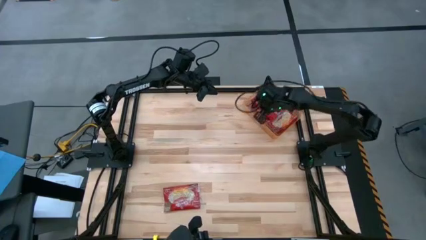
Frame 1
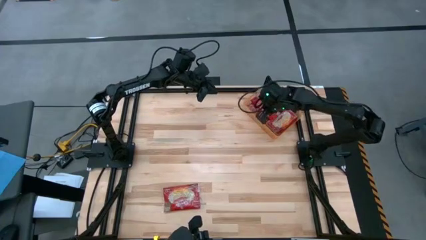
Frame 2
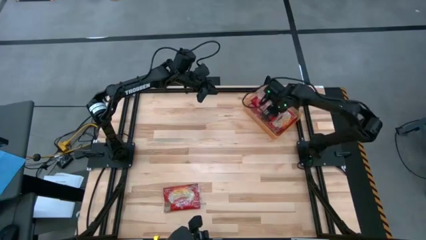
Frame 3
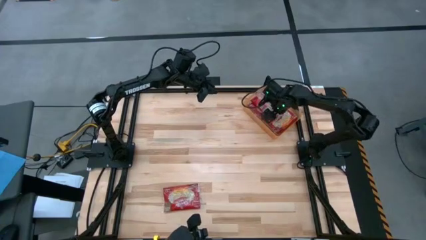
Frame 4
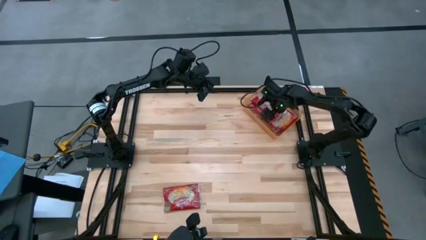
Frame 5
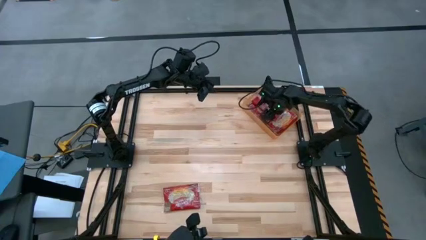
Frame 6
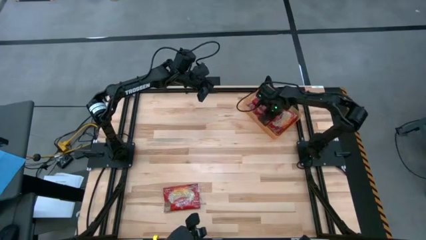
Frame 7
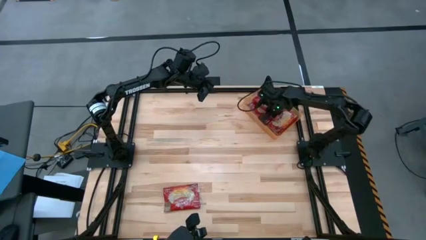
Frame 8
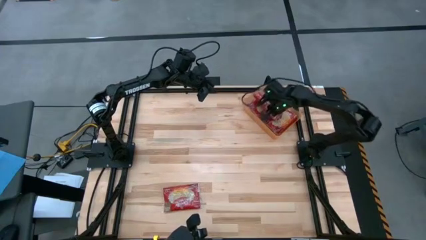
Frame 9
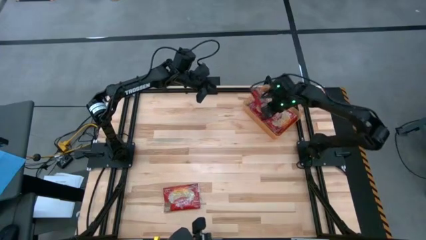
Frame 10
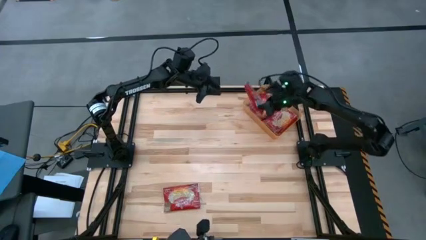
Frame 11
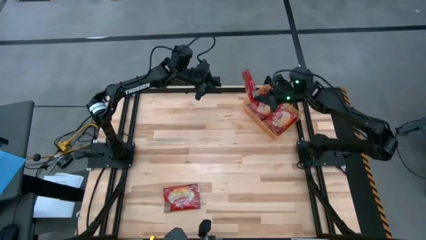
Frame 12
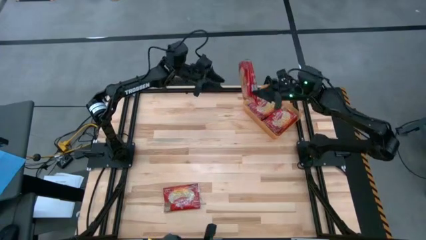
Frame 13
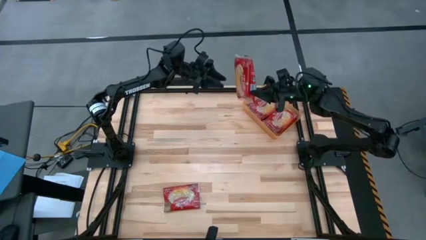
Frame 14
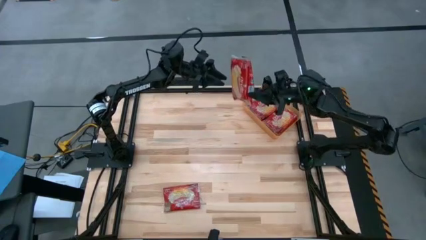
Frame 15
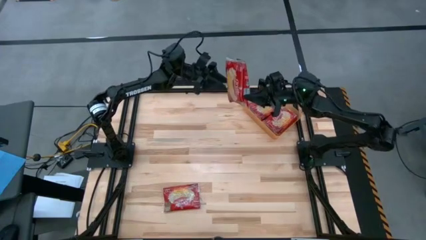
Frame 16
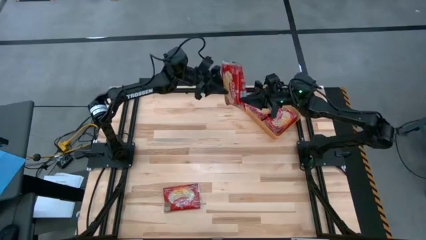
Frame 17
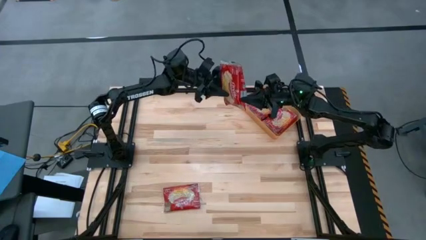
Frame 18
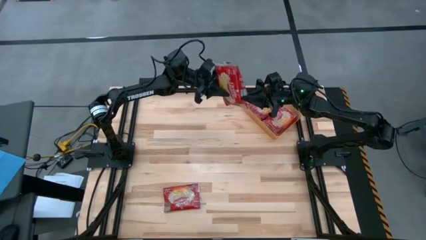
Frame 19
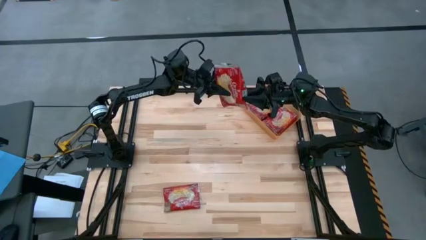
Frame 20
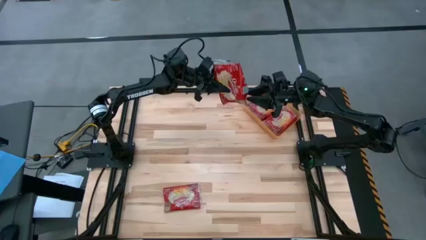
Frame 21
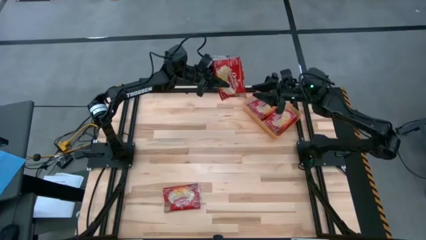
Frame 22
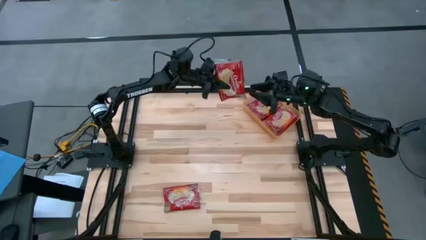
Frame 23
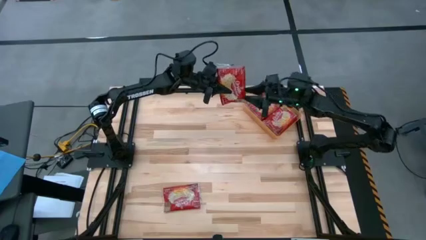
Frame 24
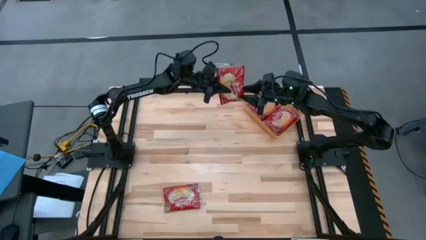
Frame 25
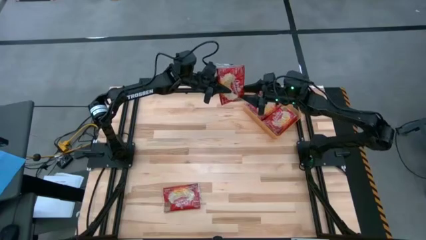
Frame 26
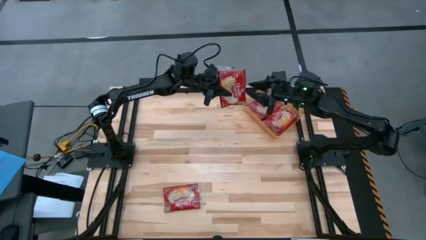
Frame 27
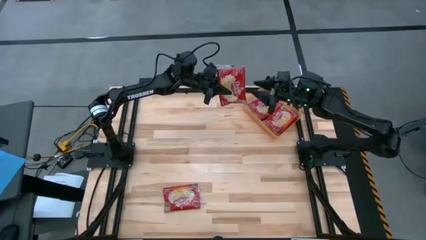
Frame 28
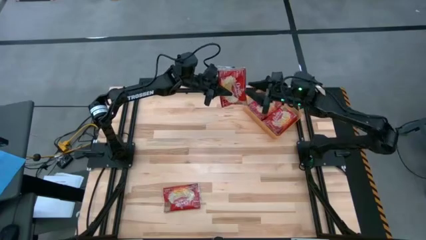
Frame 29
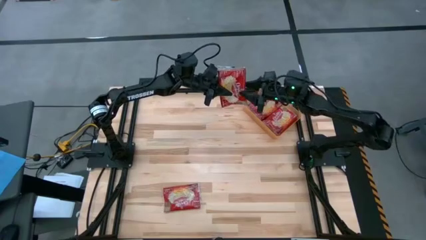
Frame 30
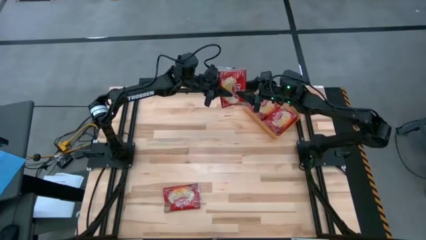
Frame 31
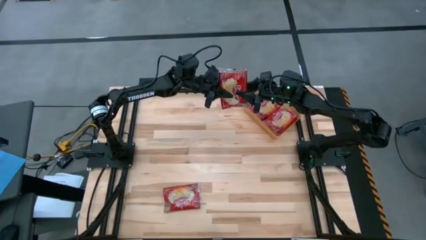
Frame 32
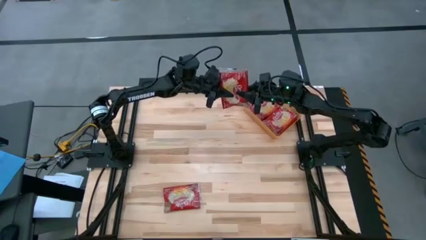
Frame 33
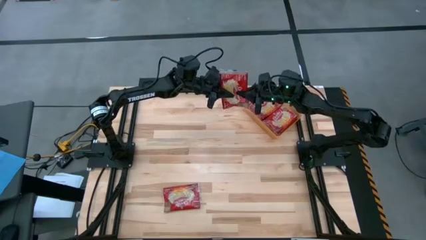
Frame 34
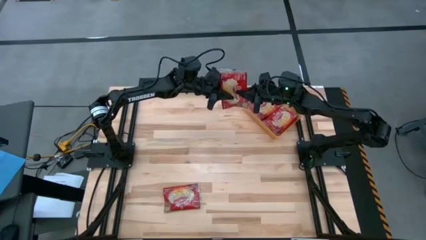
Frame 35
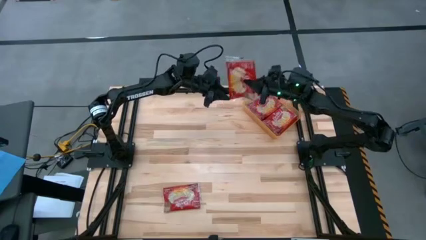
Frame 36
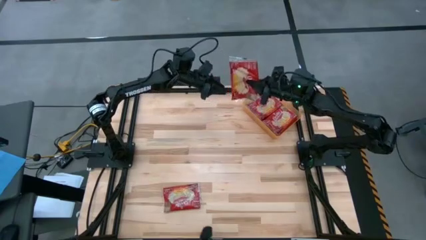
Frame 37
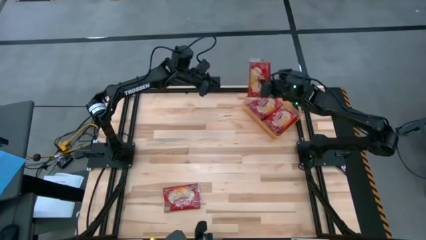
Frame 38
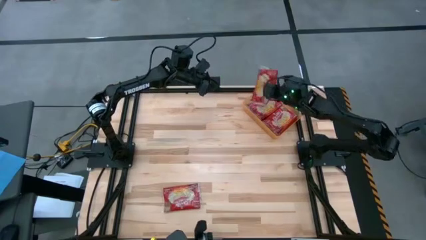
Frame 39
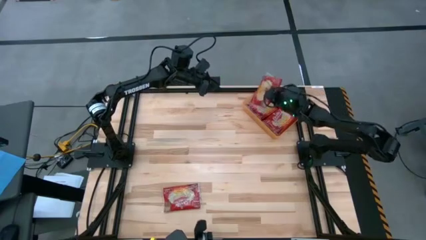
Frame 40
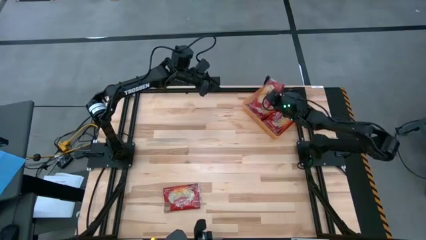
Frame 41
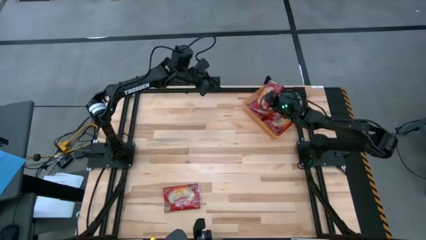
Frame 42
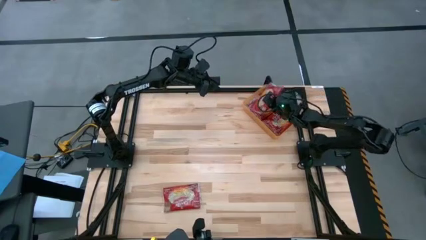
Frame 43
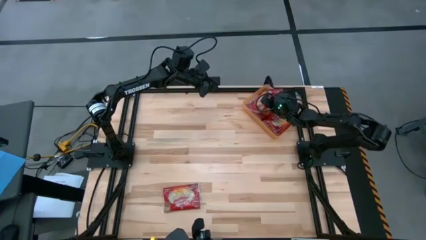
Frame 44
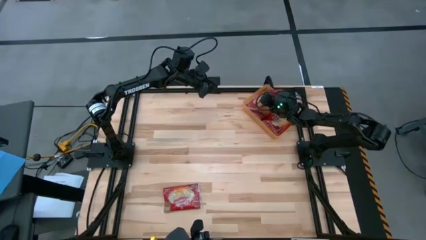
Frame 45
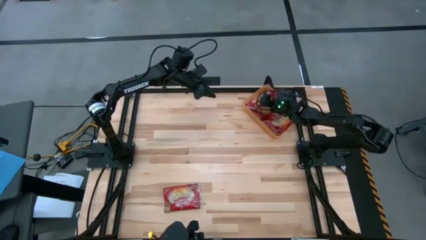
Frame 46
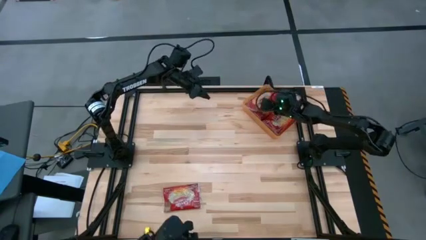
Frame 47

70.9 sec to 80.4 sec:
Task: Sort popcorn bags into baskets
Put the red popcorn bag into the orange bin

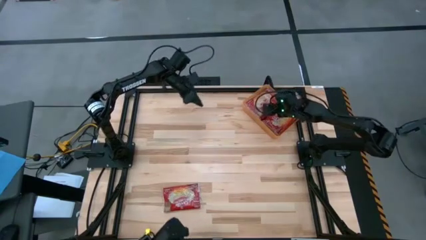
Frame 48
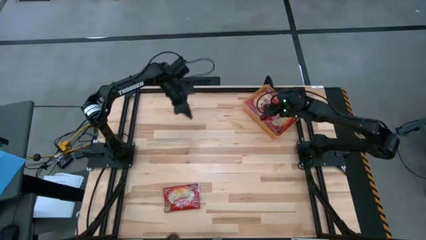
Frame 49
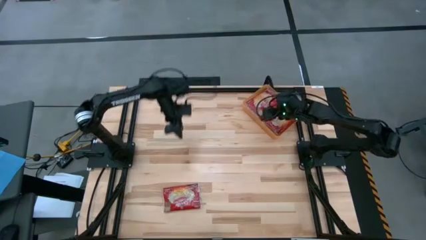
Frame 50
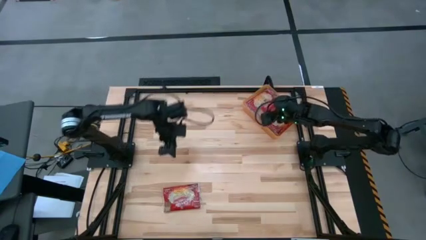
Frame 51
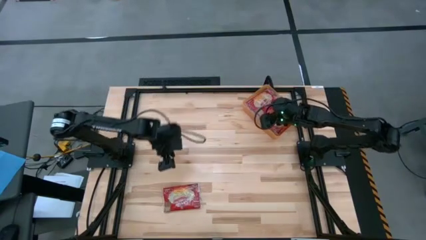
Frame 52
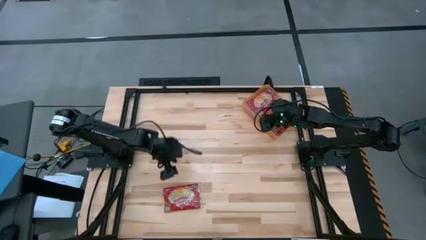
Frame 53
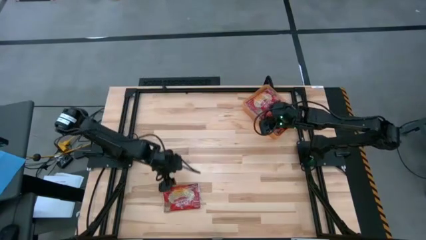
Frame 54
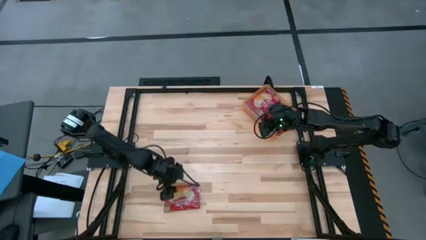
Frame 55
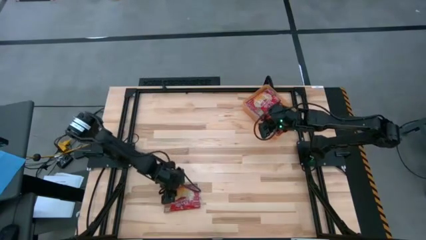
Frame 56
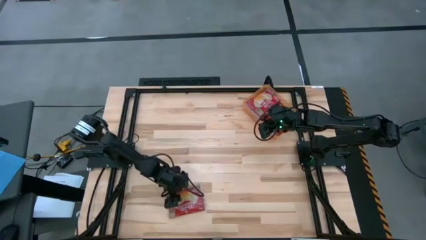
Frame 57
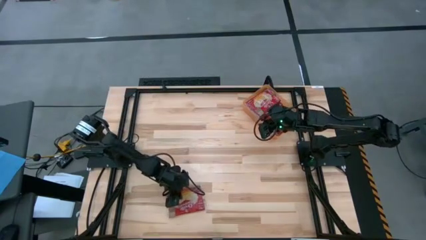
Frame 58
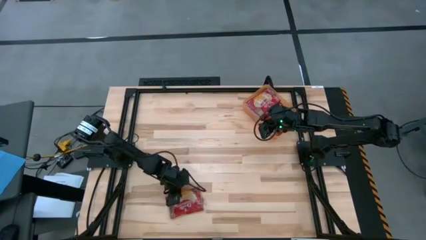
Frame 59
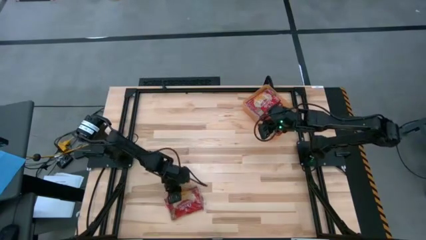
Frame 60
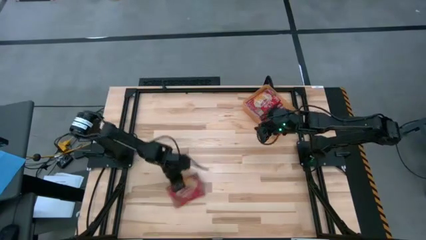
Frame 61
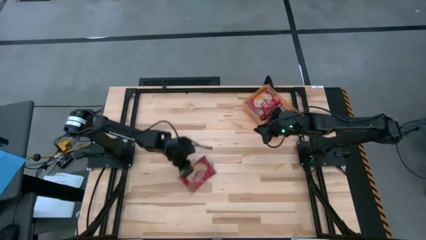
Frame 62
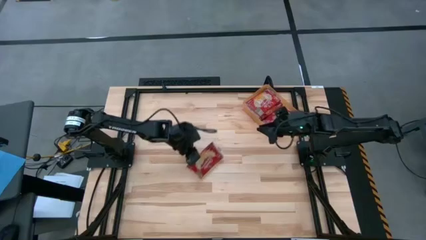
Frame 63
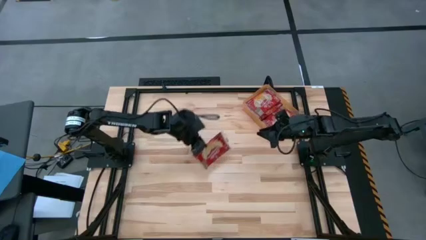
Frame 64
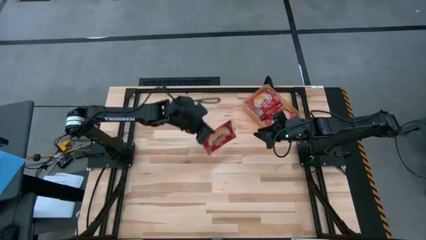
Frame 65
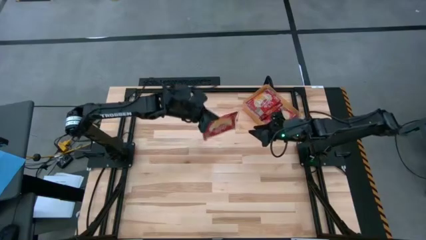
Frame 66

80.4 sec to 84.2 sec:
Put the red popcorn bag into the orange bin

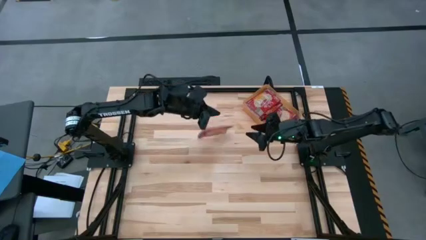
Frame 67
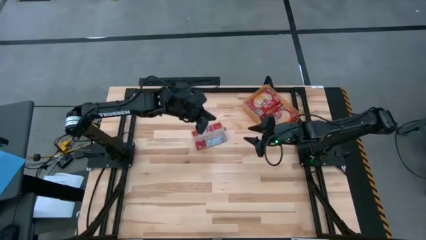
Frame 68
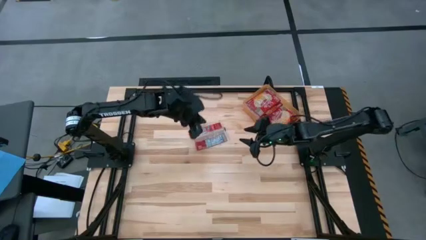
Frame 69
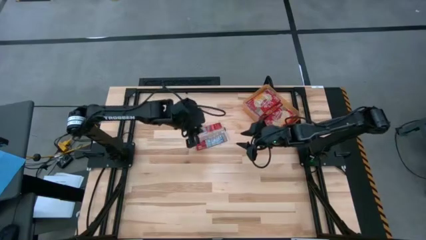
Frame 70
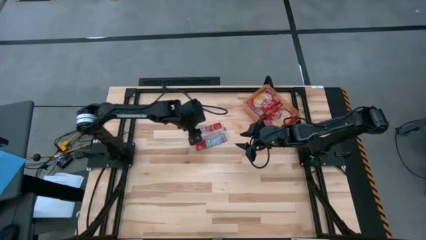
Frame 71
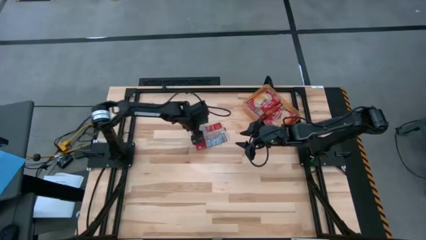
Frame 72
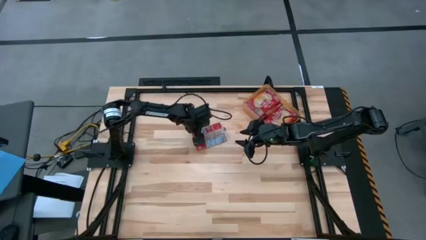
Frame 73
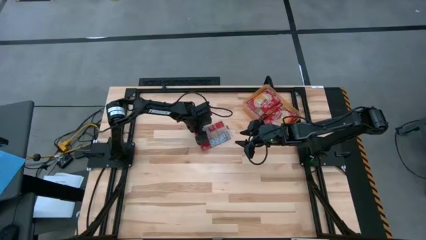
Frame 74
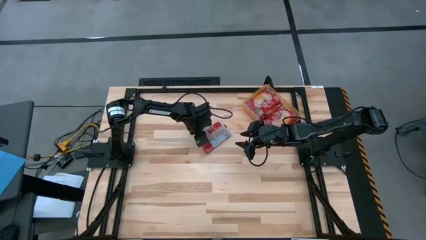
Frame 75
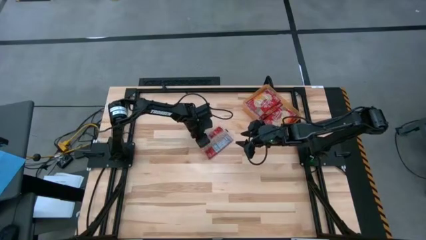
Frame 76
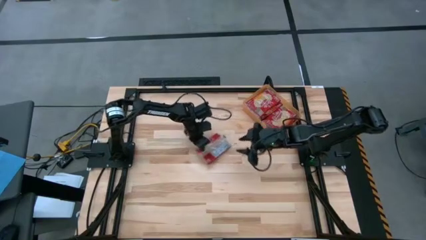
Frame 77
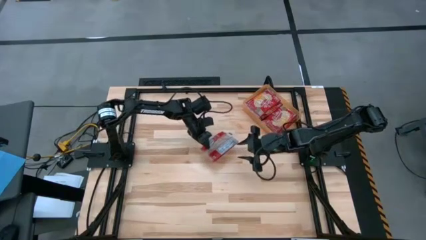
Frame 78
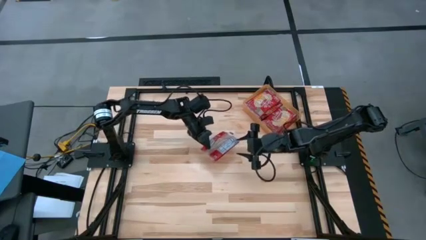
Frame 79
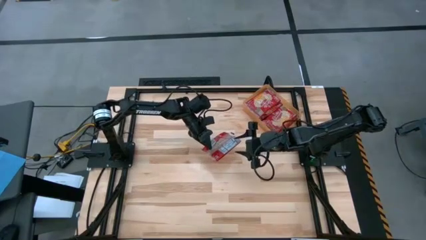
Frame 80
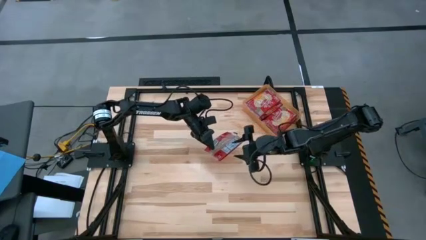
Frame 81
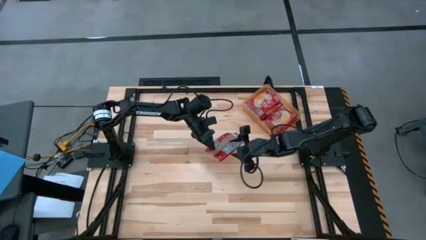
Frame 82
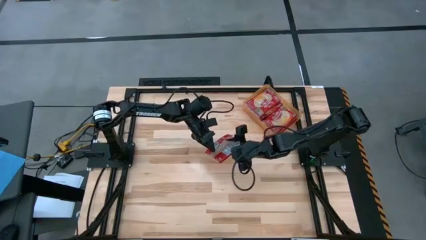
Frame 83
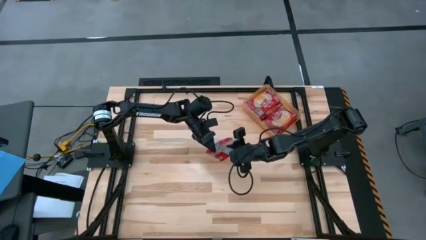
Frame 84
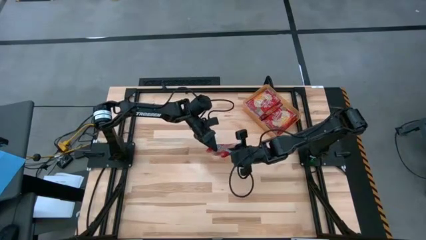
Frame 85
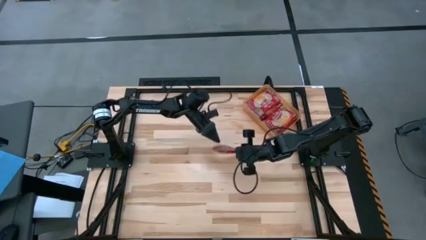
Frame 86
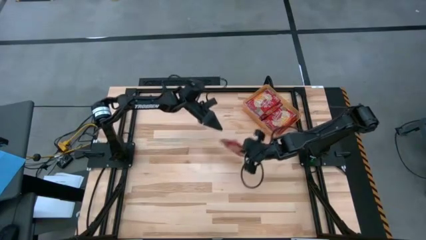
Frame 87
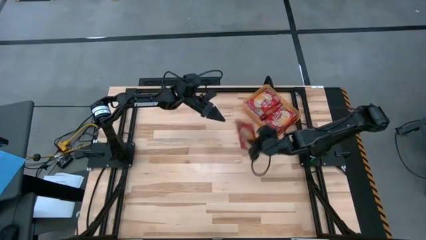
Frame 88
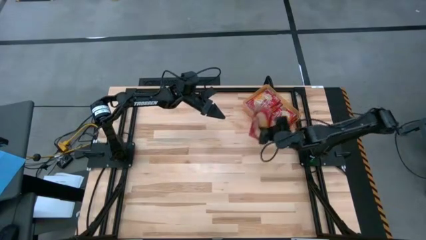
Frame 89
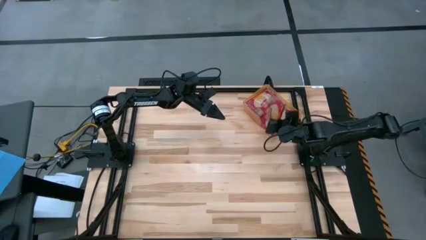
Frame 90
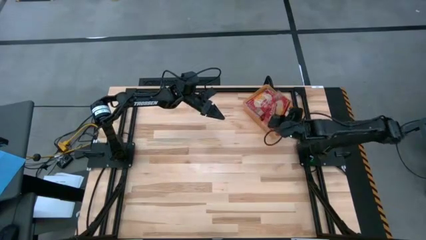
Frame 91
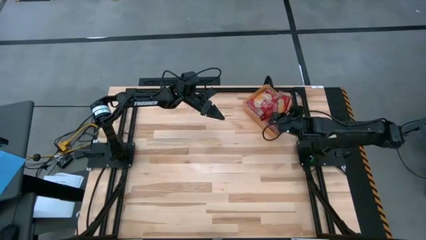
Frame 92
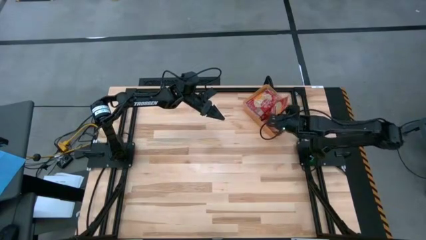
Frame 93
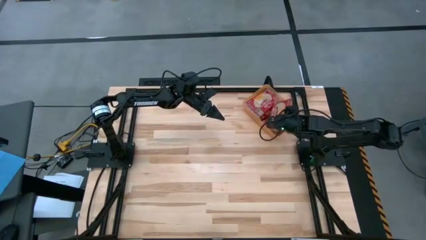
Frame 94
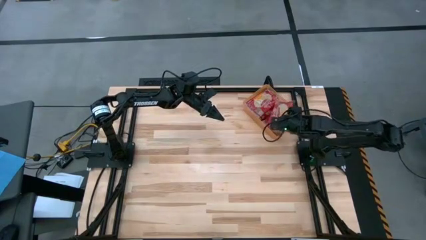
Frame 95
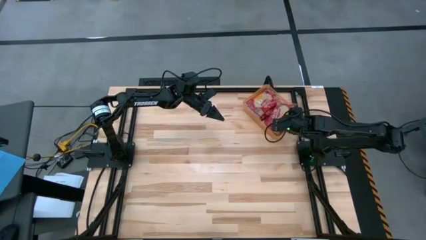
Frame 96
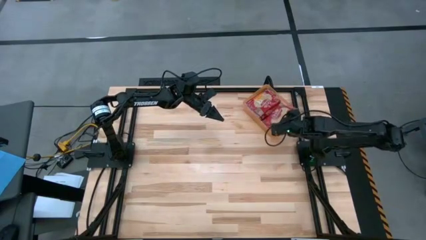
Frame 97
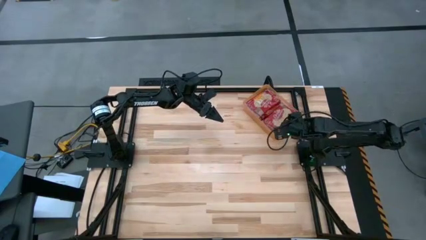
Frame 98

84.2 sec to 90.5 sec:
Put the red popcorn bag into the orange bin
